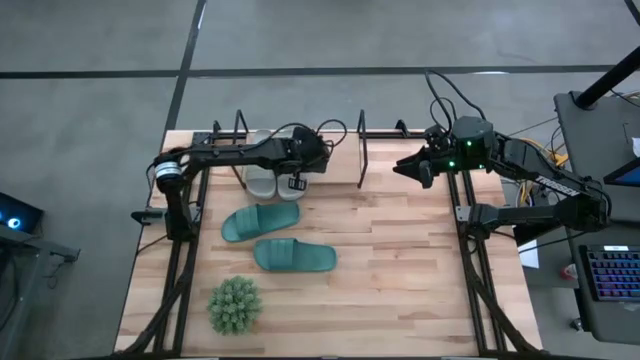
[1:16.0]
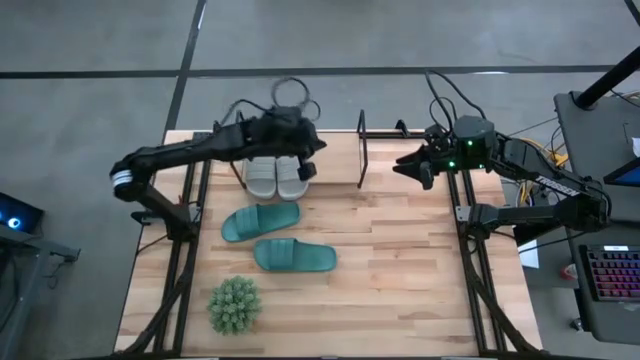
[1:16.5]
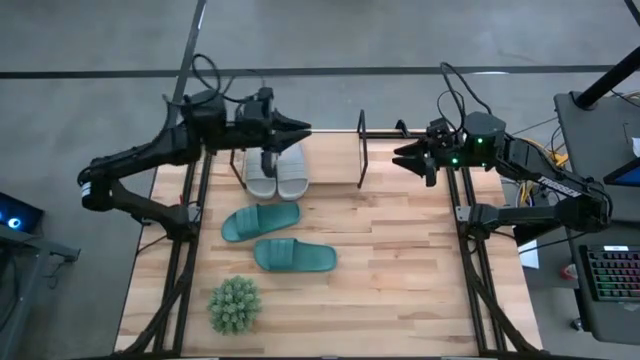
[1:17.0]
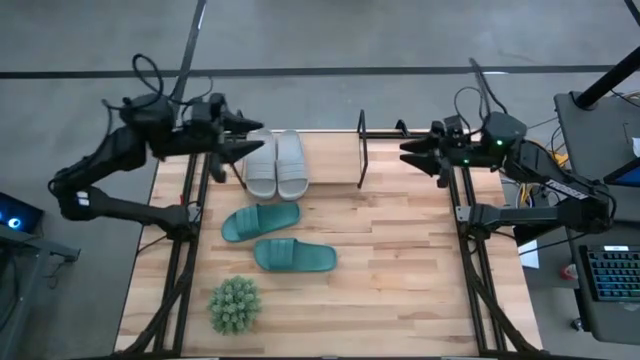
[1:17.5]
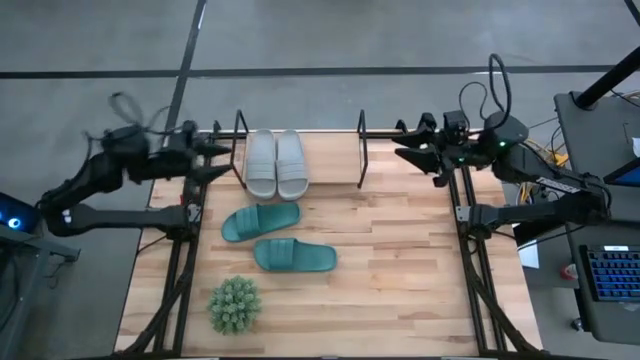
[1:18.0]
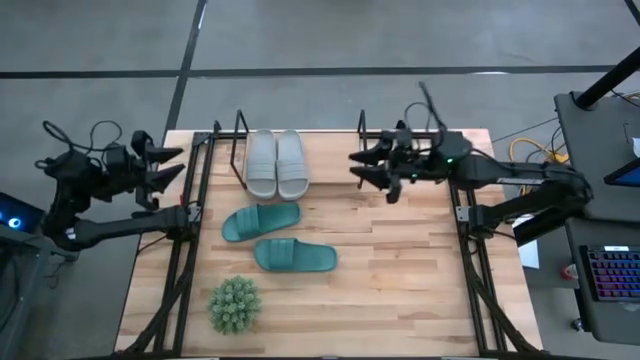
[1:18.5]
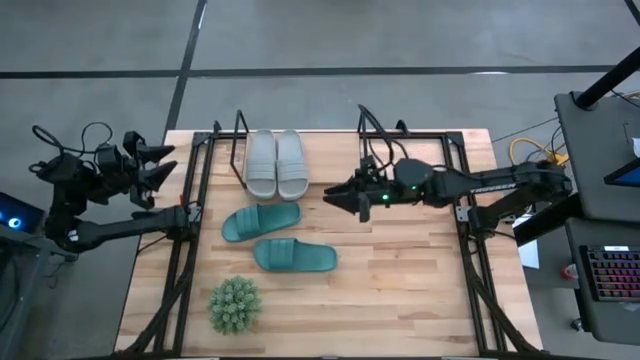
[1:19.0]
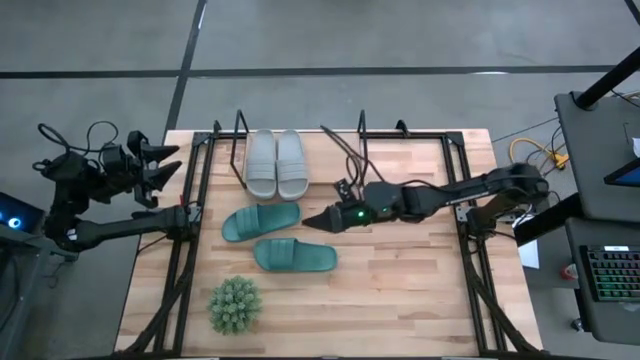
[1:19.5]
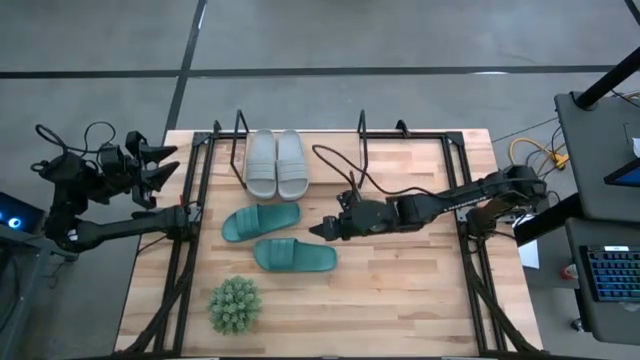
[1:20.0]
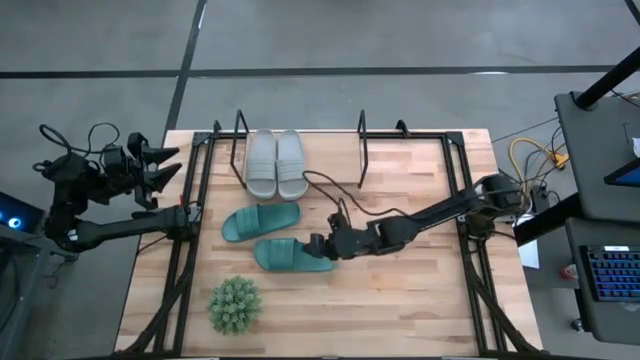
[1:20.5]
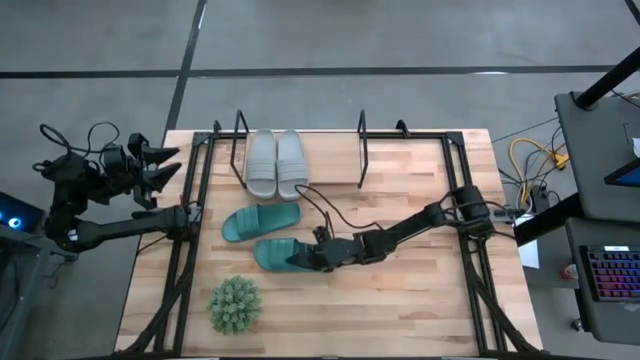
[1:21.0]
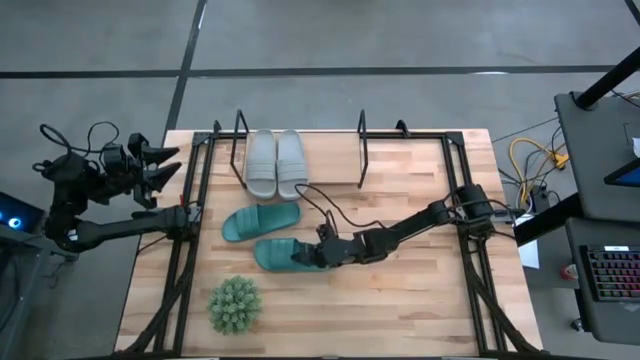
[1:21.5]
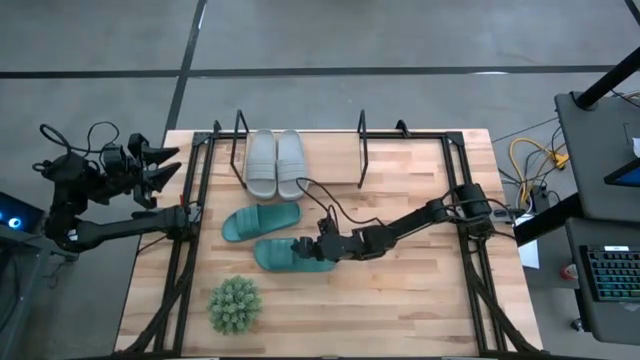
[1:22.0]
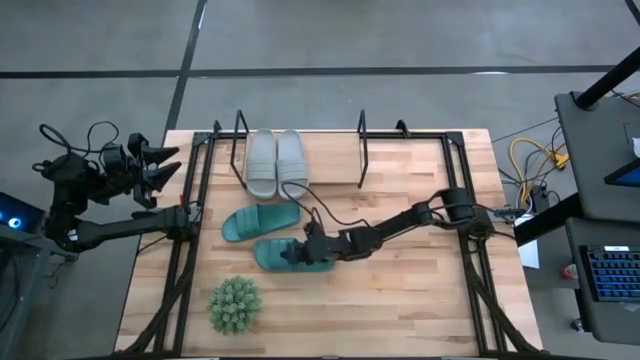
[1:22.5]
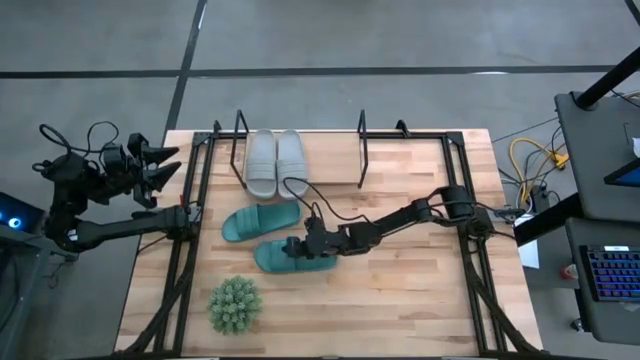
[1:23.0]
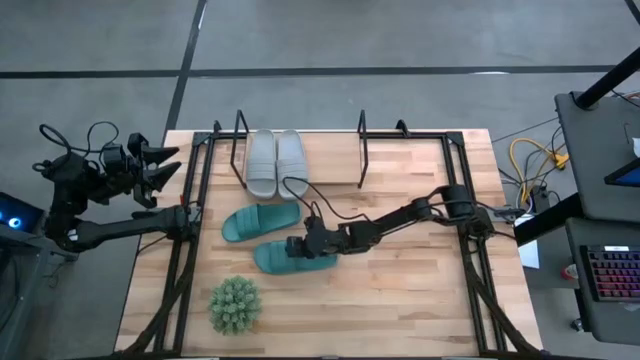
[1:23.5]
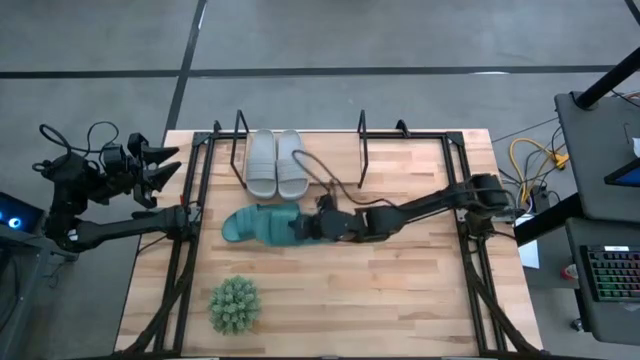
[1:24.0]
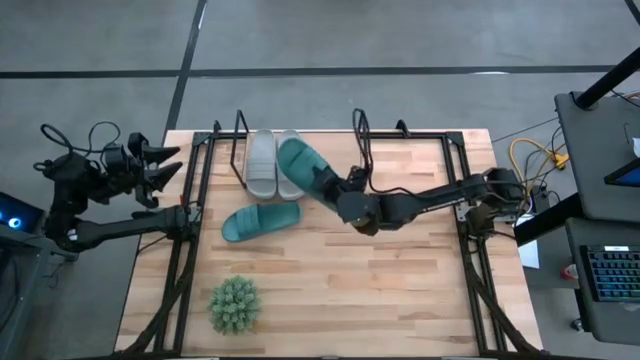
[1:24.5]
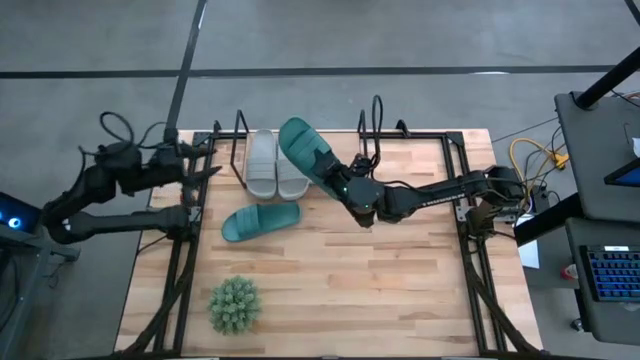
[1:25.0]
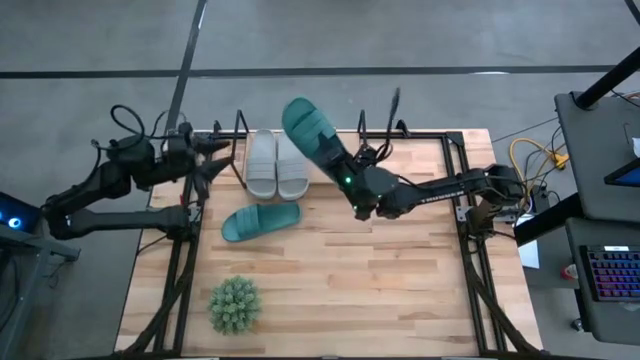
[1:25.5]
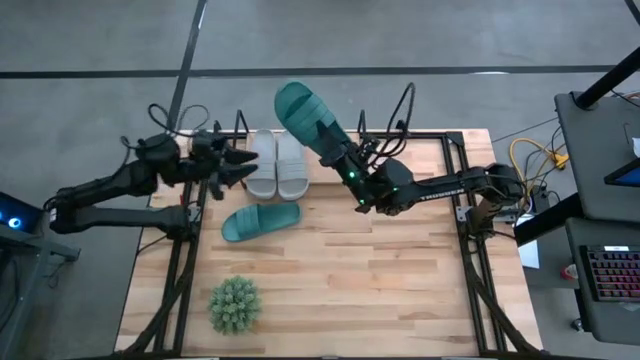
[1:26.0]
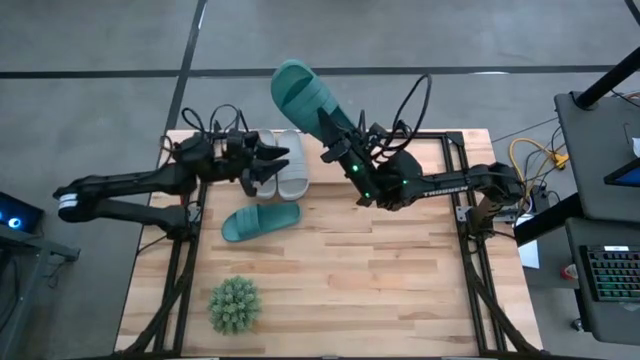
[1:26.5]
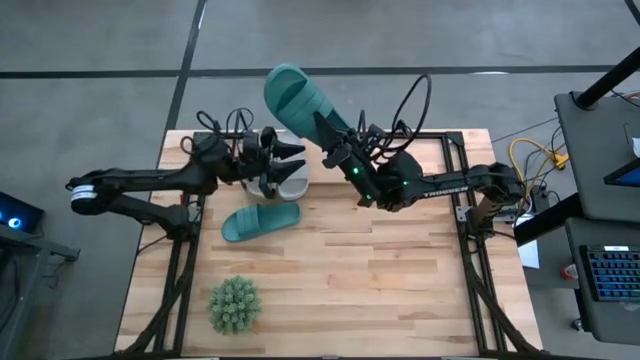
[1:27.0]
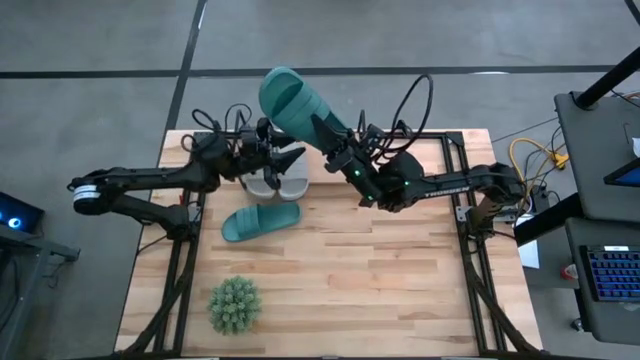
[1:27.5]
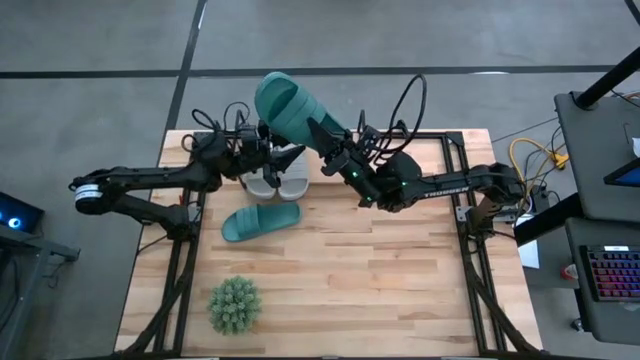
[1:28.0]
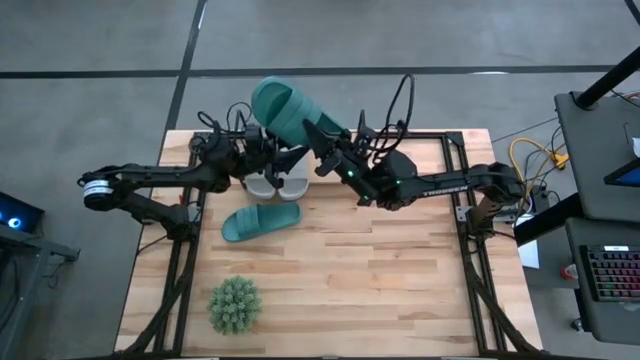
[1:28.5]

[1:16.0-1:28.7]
Task: Pick and place slides into the shelf
Put the bottom green slipper on the shelf

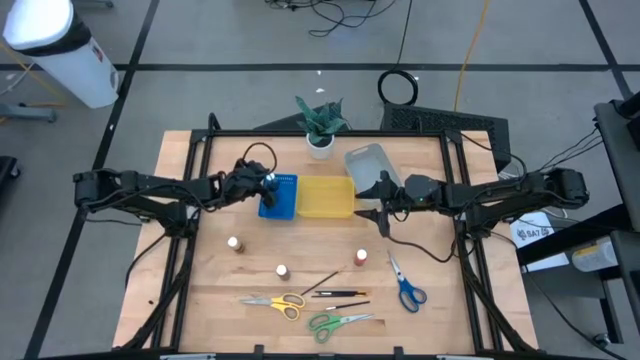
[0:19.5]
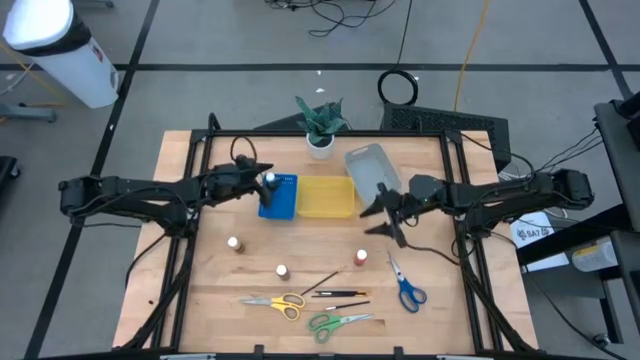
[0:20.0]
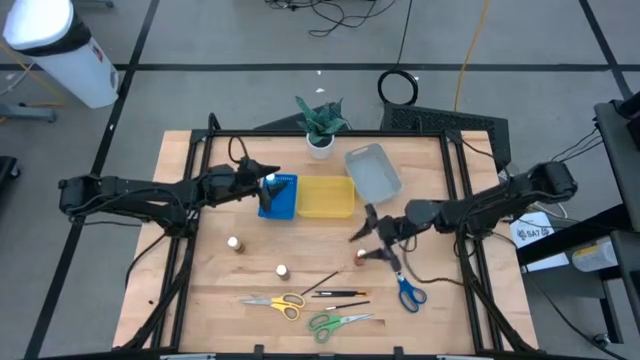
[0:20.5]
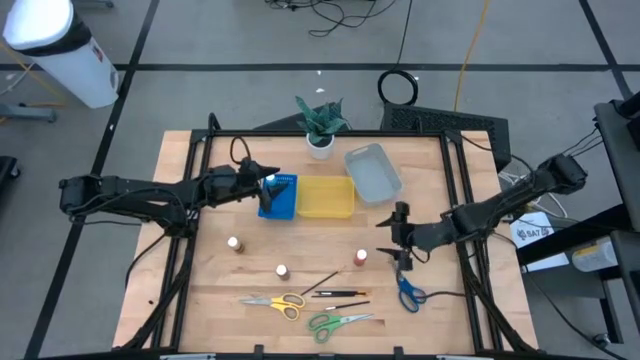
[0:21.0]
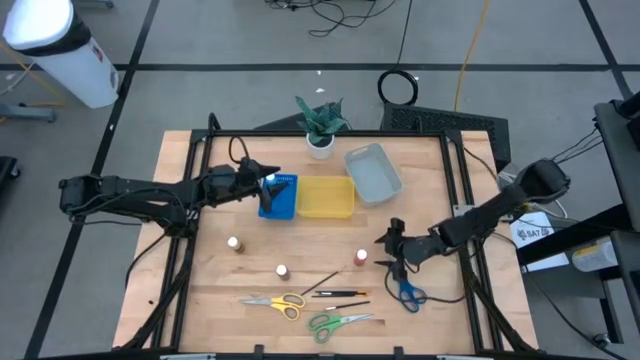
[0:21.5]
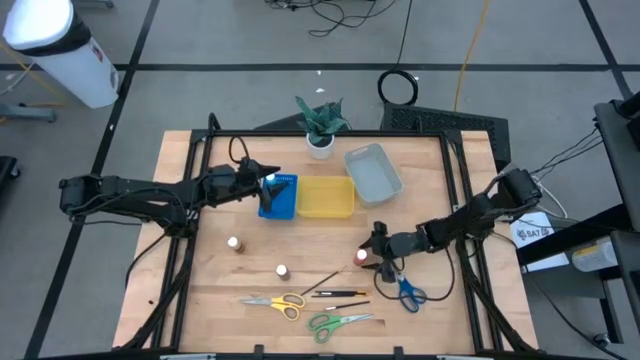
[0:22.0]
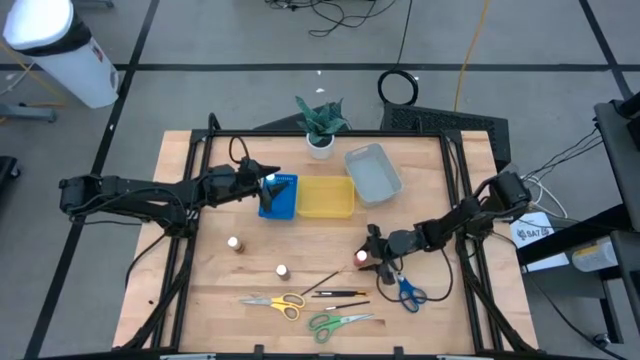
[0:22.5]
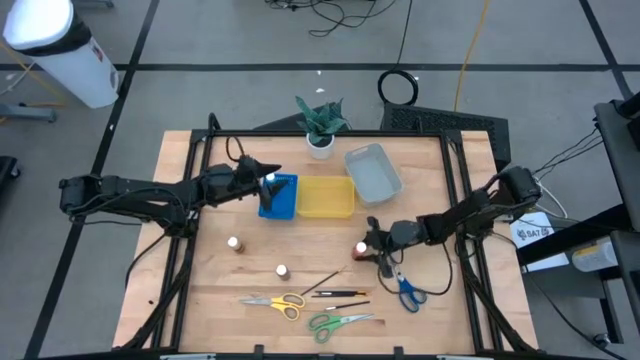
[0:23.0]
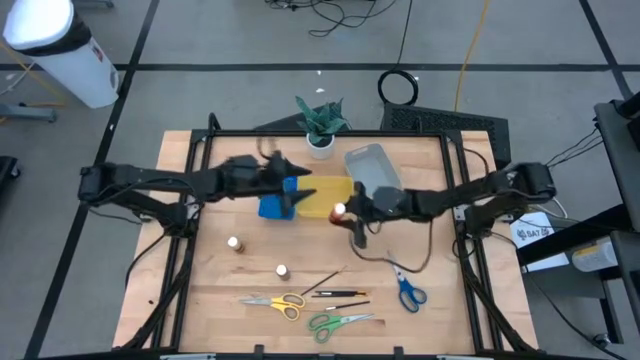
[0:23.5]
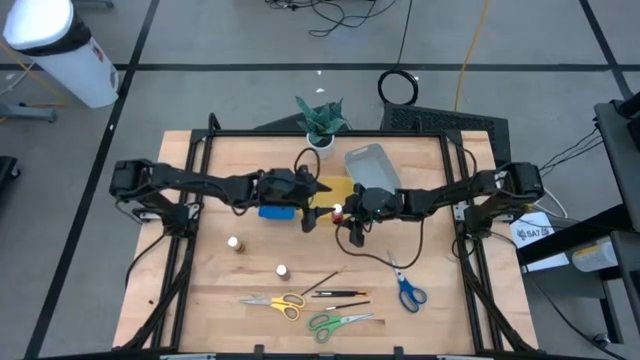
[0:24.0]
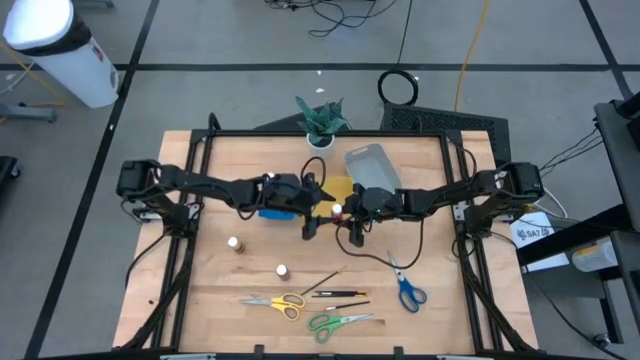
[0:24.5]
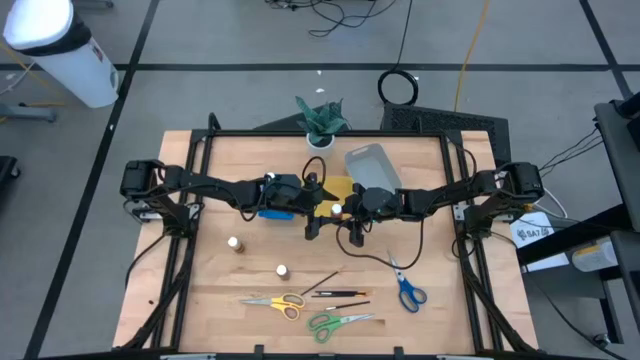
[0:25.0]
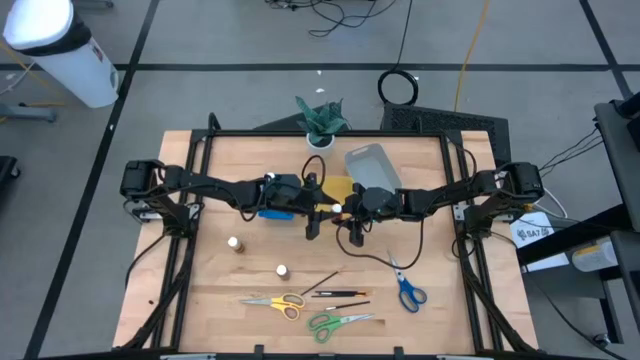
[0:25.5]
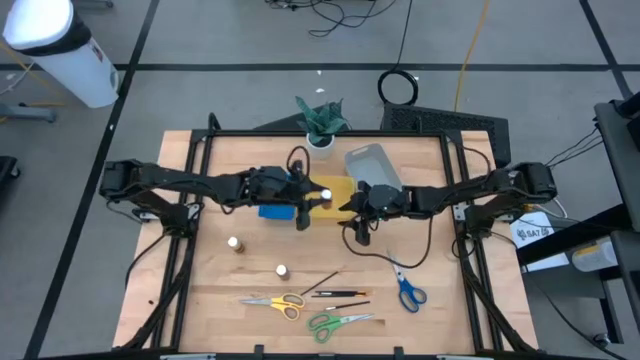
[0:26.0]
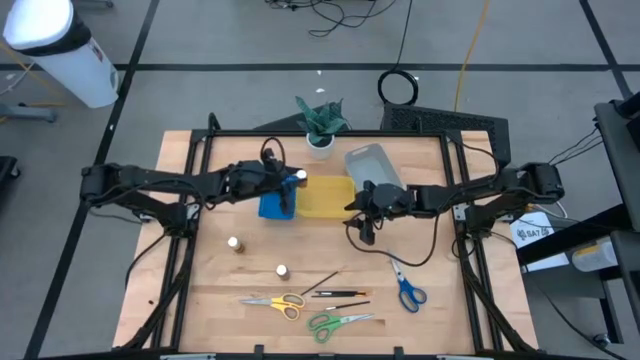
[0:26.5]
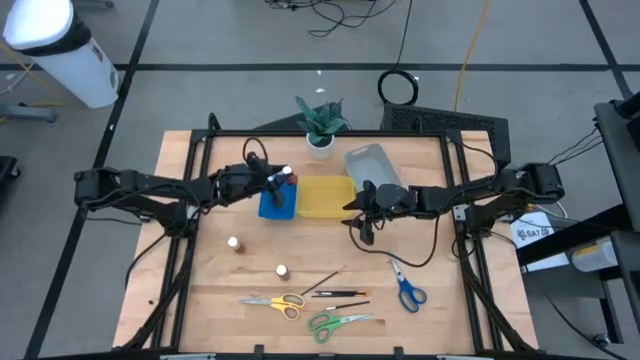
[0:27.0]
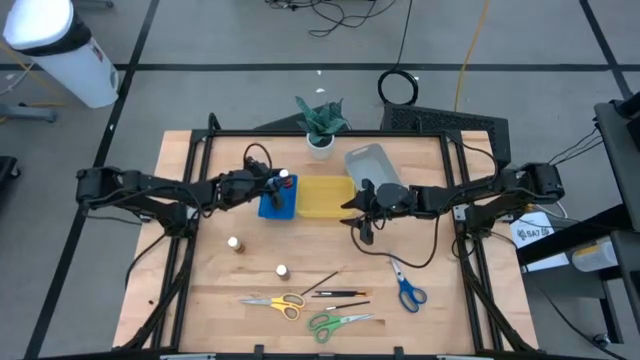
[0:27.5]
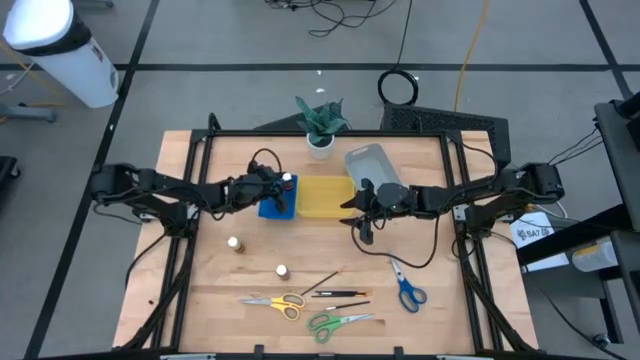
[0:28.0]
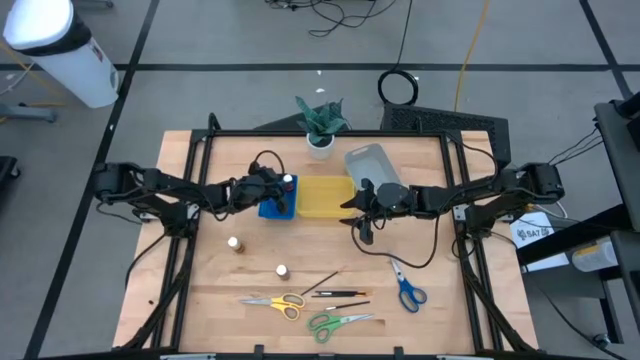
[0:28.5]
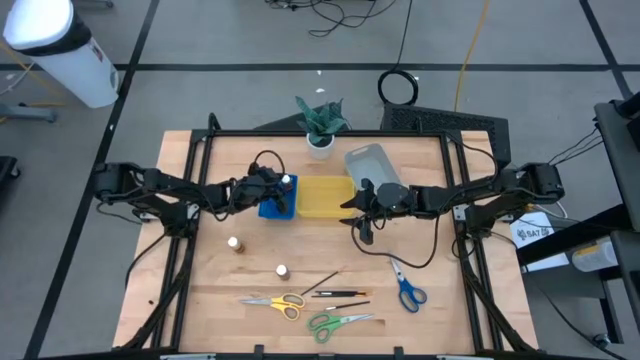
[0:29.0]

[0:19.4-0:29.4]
Task: Pick & Place Paint Supplies
Put the red paint bottle into the blue bin
